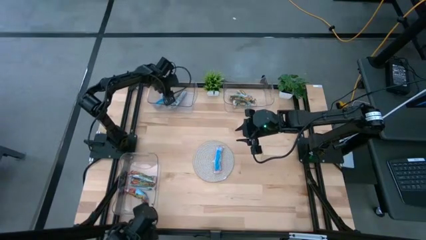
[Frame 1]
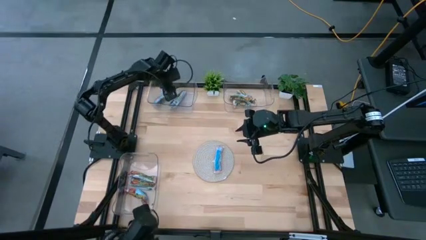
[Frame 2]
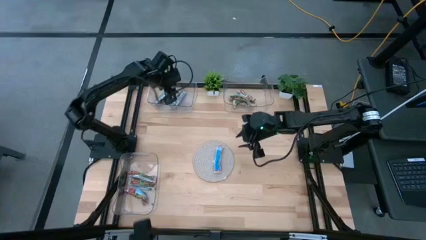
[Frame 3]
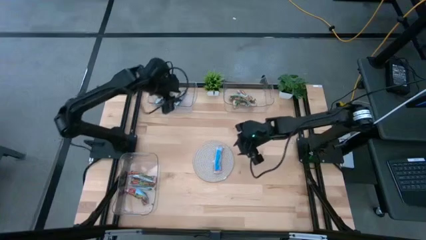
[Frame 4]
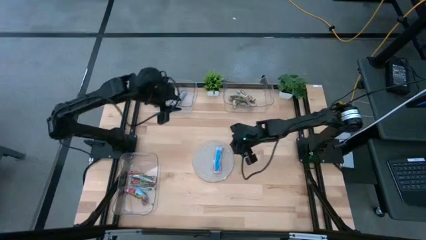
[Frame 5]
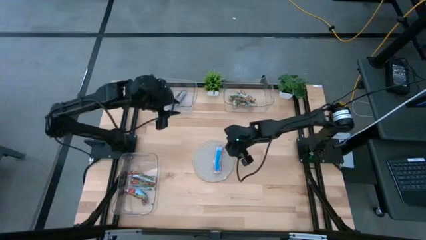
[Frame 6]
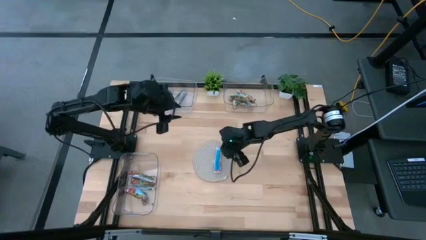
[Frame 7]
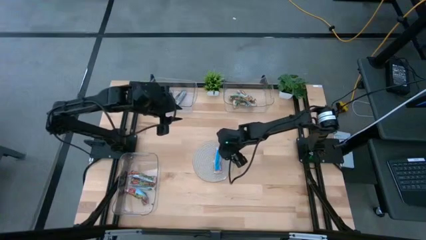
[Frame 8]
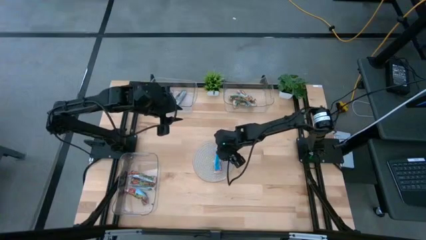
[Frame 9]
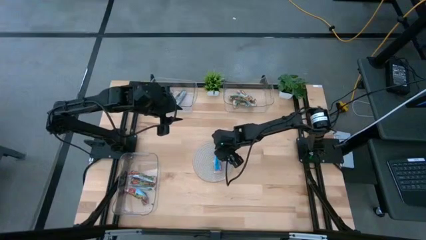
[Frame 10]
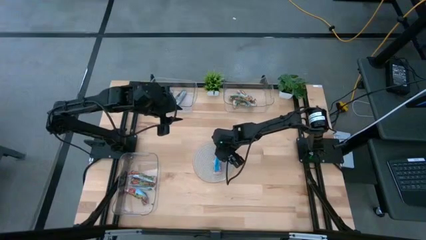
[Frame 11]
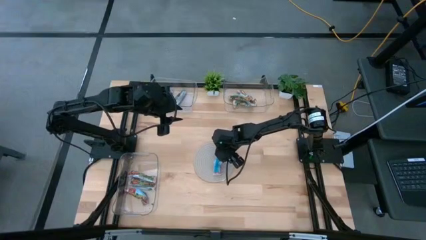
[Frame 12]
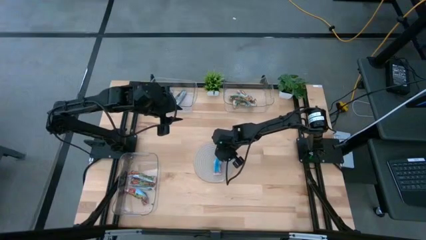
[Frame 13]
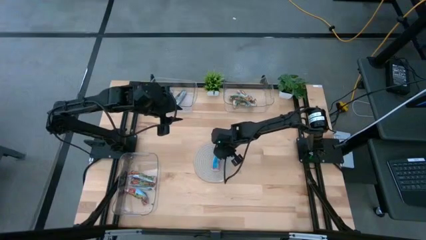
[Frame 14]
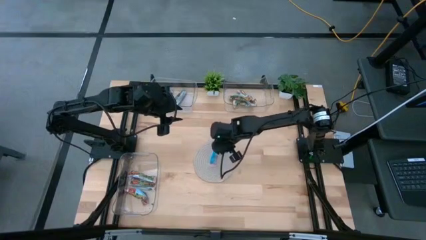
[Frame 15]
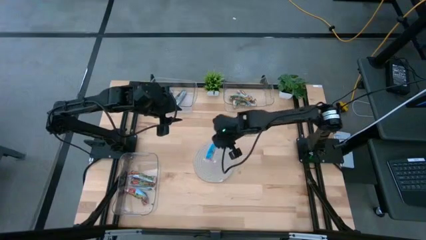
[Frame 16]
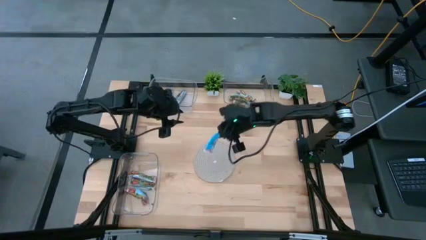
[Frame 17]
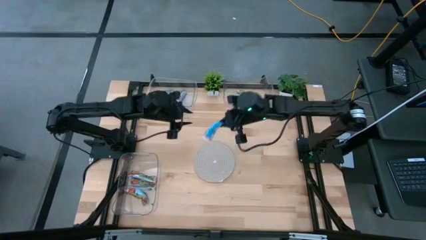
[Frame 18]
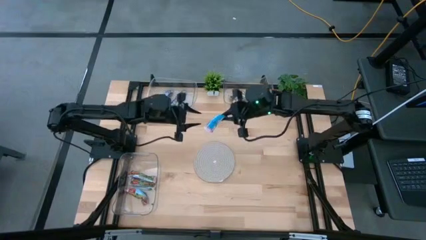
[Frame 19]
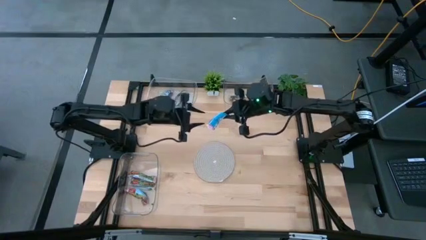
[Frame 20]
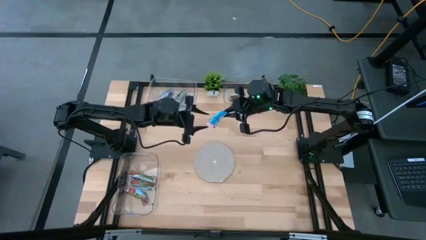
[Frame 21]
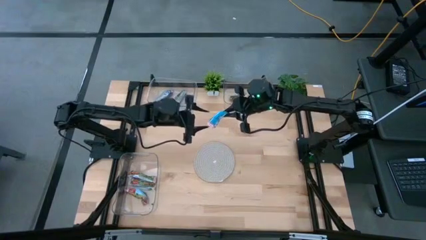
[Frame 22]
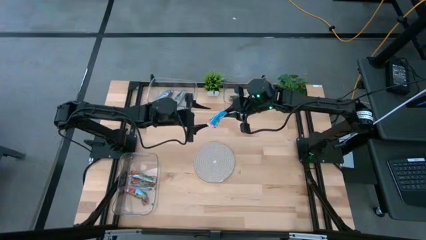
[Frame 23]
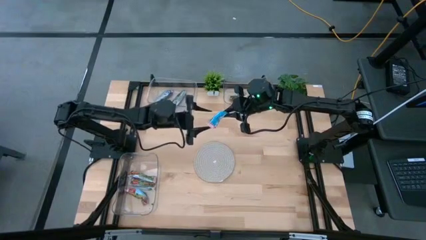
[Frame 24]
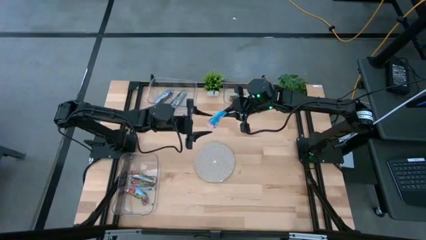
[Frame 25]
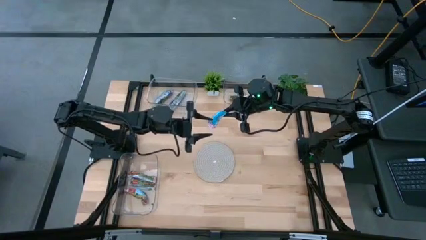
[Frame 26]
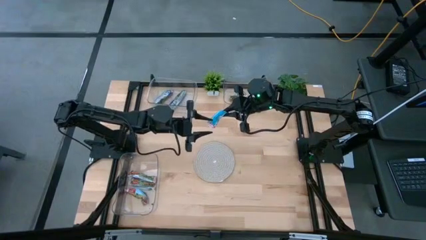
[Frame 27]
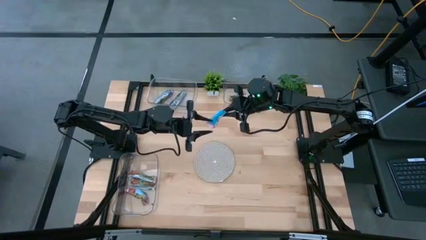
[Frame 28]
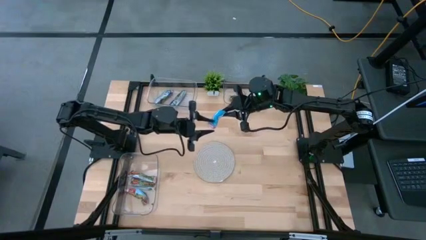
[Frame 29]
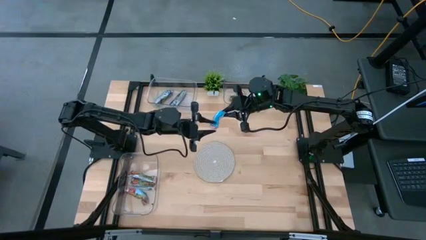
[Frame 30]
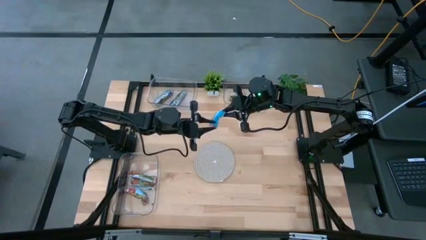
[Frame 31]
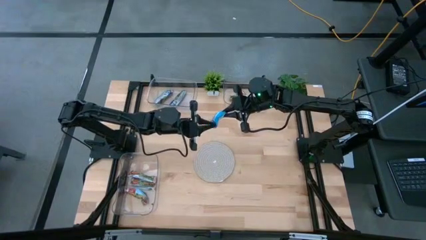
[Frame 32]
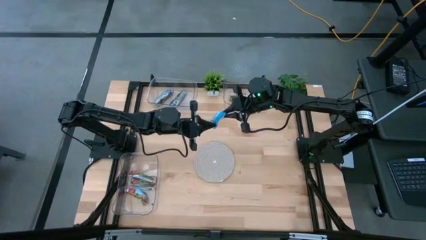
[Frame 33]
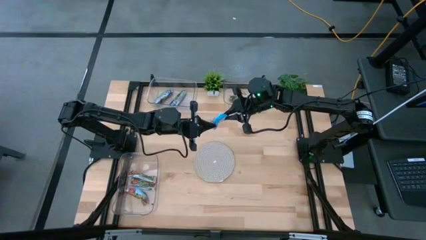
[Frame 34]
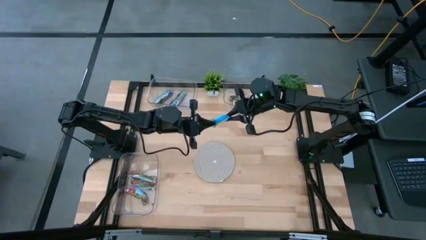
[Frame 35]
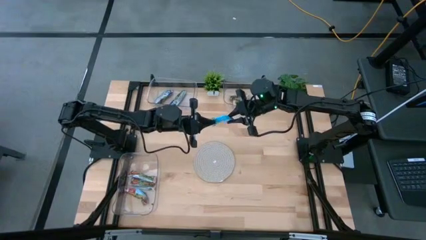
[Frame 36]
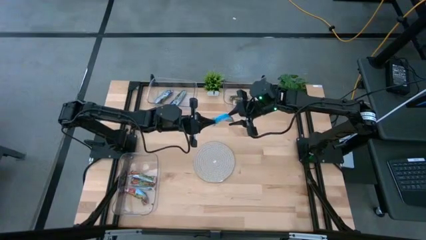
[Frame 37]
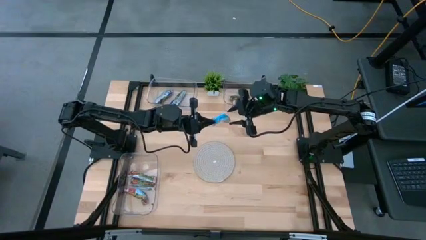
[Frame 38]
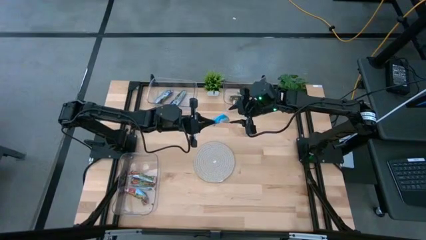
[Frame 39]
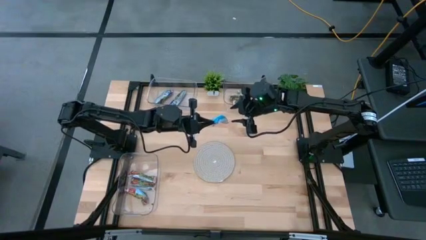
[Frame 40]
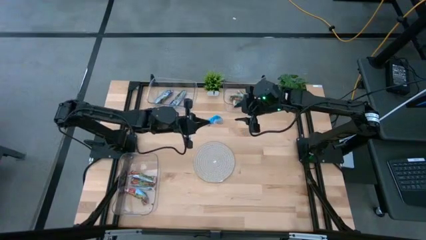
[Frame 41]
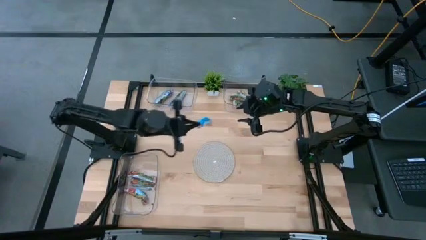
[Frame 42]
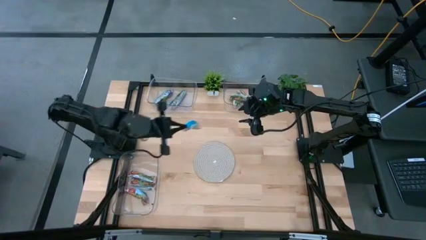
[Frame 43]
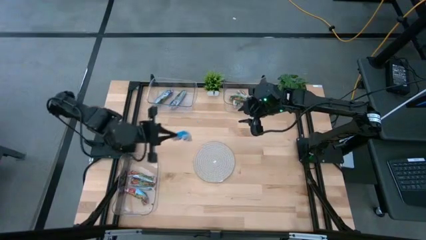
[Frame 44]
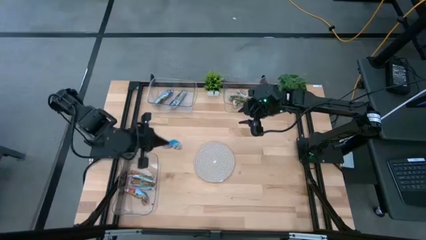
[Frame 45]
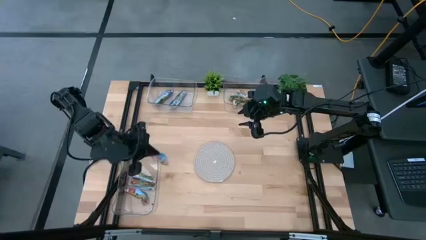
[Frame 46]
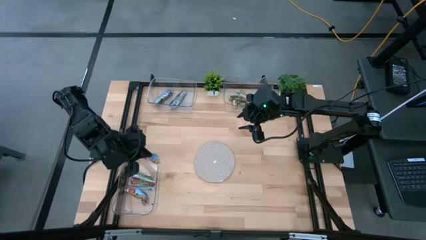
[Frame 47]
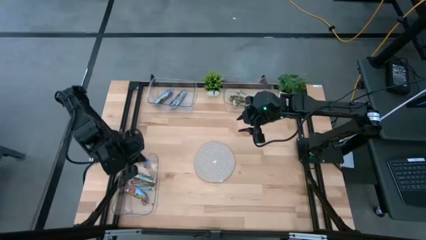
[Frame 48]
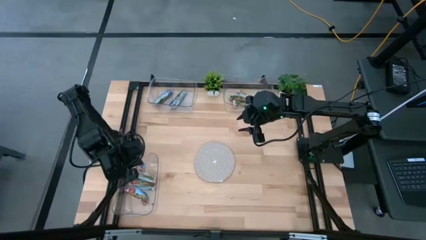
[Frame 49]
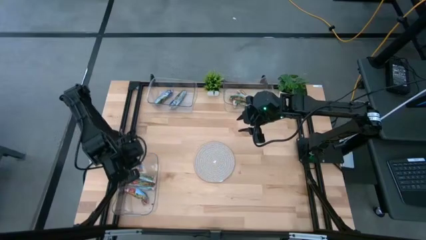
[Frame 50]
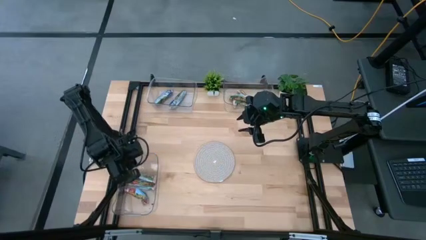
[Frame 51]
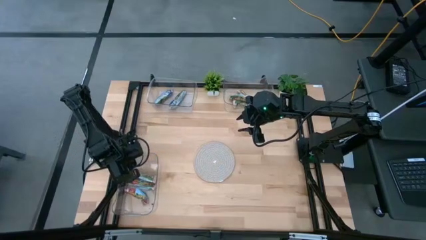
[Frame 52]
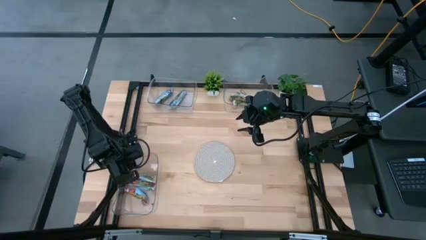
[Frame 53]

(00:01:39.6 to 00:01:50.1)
Task: Pick and place Granola Bars by type
Put the red granola bar into the bottom transparent bin

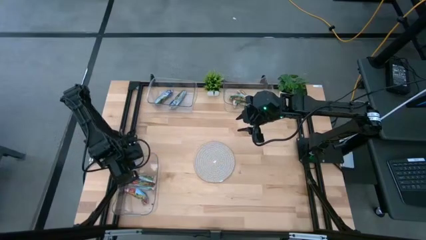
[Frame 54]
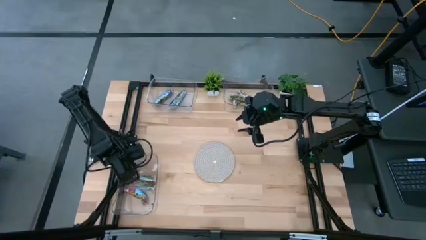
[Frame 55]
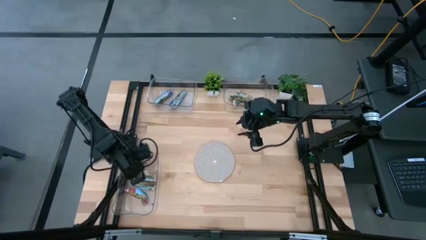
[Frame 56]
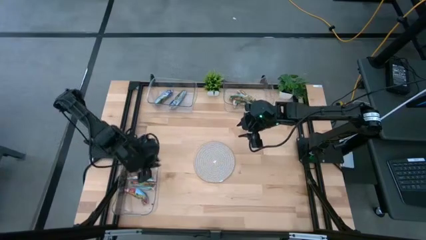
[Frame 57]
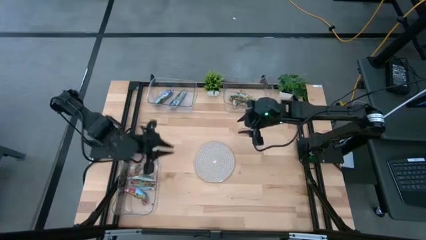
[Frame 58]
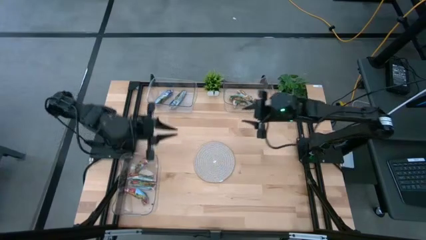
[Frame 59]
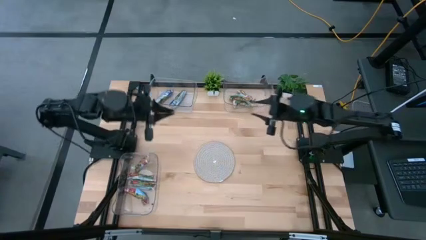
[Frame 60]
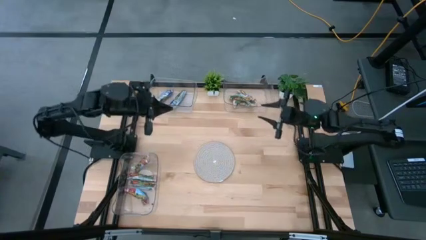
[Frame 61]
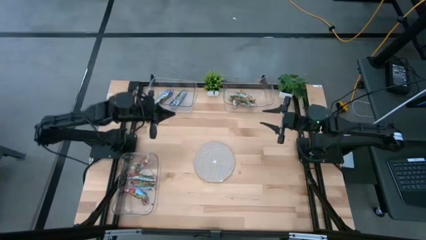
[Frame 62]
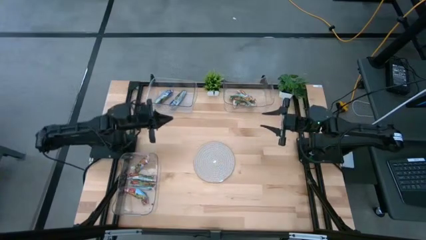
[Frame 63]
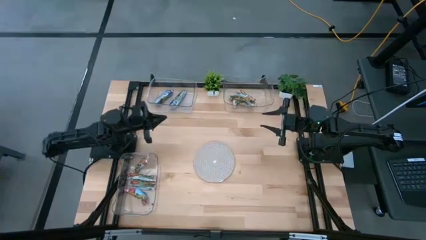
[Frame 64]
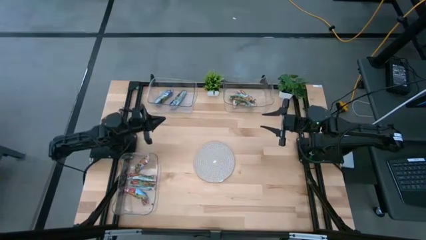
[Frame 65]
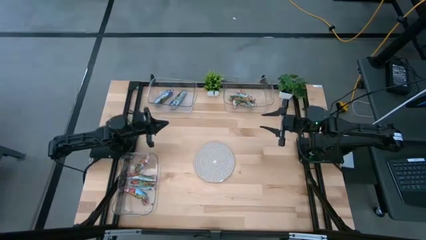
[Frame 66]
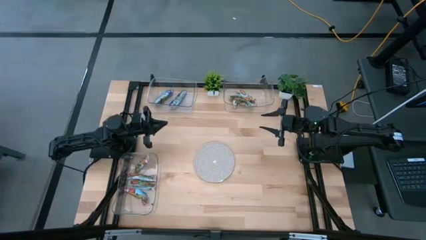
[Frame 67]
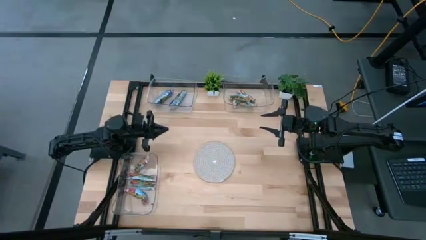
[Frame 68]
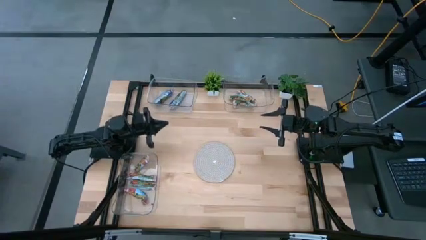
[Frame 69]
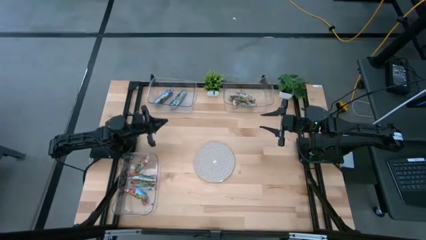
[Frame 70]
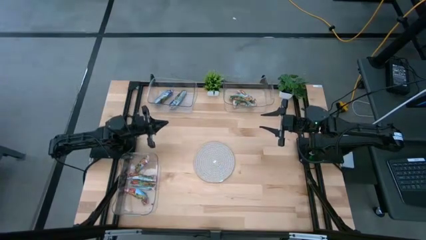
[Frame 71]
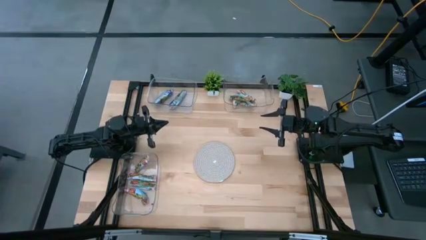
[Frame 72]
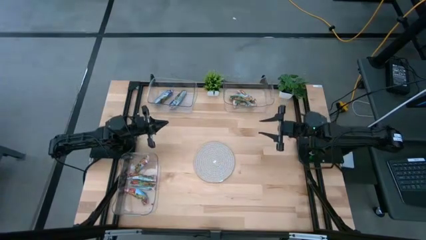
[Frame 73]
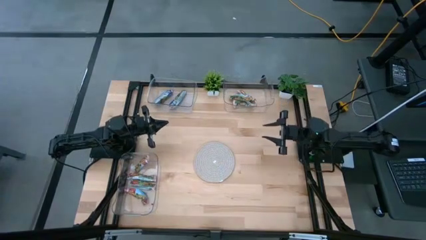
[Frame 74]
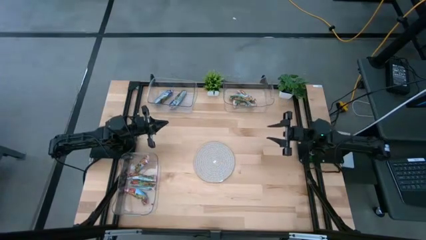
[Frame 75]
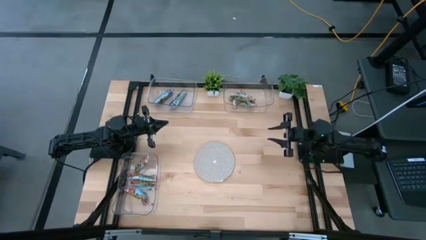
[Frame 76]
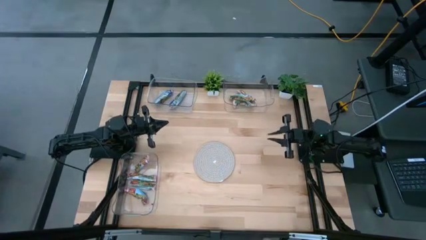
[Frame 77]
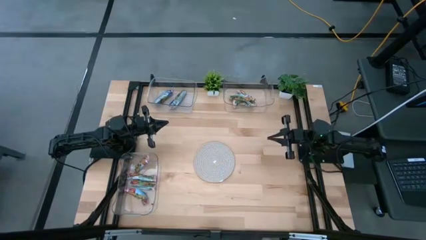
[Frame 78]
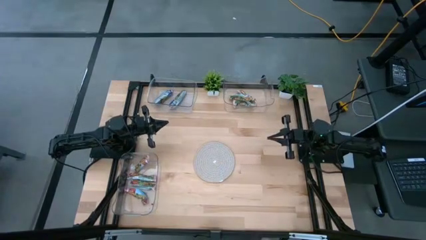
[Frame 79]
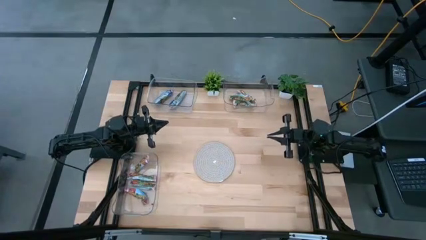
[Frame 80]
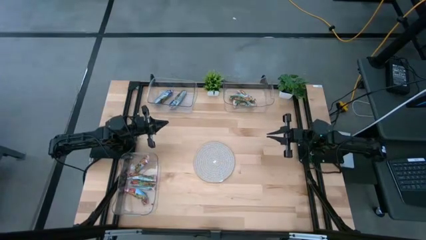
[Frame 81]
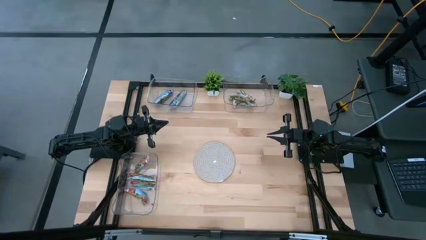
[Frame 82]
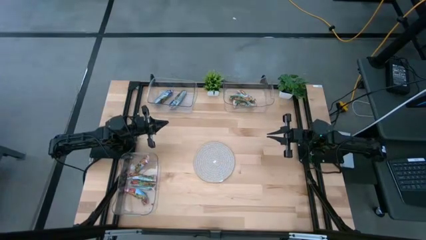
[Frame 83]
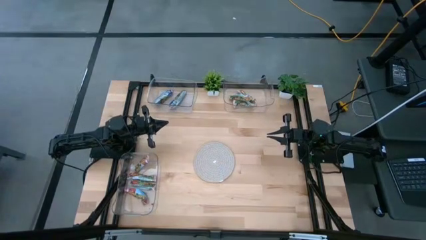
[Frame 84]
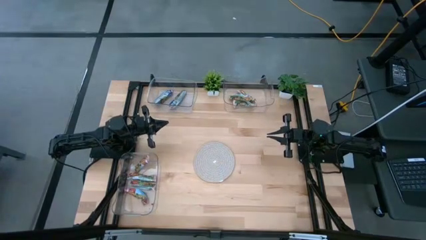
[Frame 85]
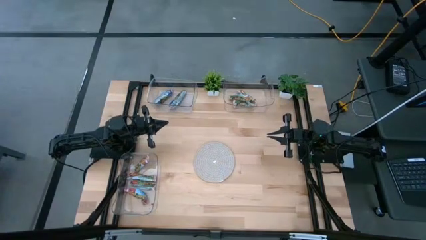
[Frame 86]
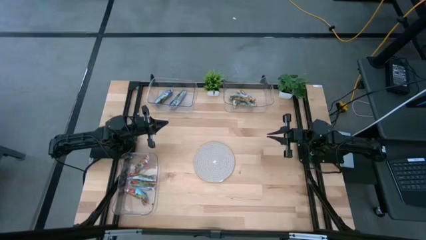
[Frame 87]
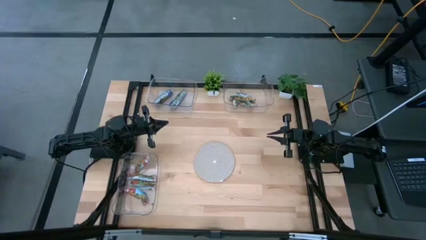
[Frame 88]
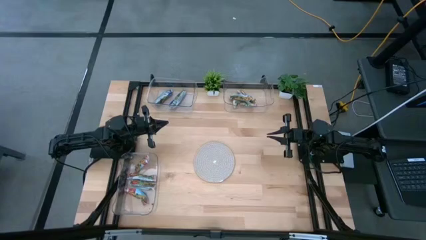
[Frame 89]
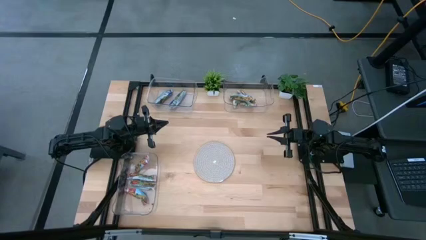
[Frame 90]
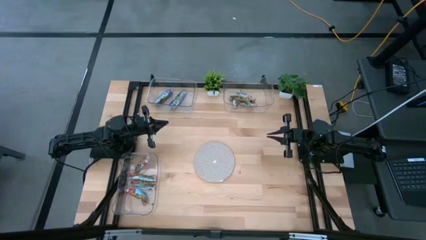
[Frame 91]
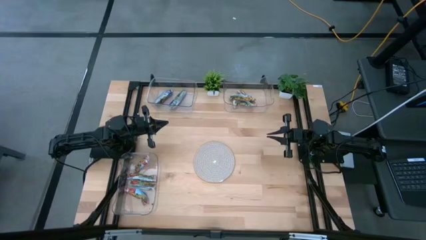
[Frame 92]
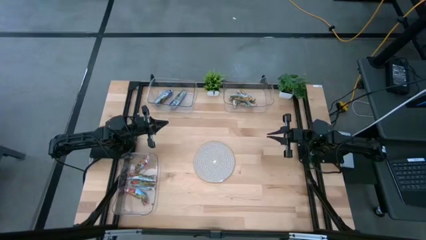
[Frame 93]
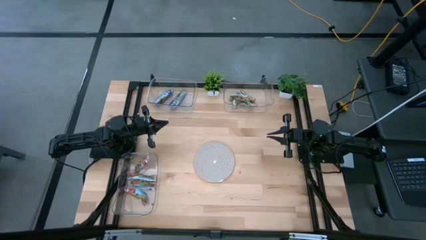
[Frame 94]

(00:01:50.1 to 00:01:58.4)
Return to Home Position
